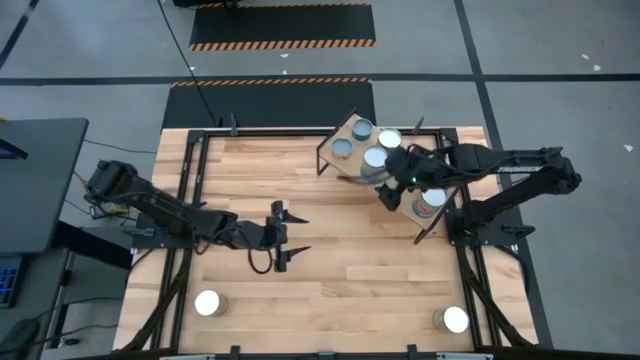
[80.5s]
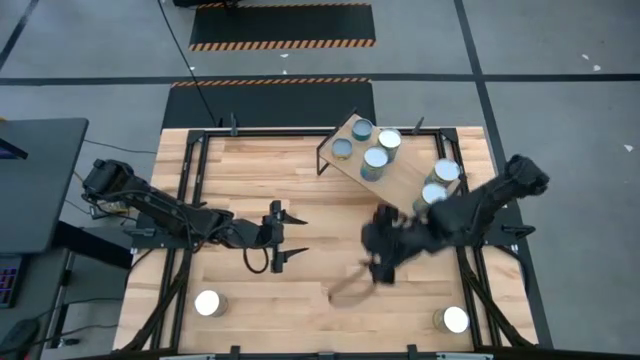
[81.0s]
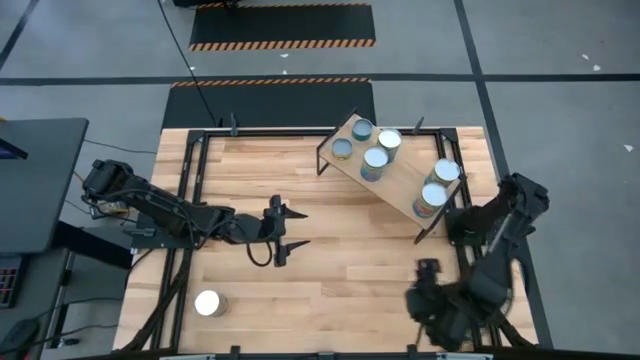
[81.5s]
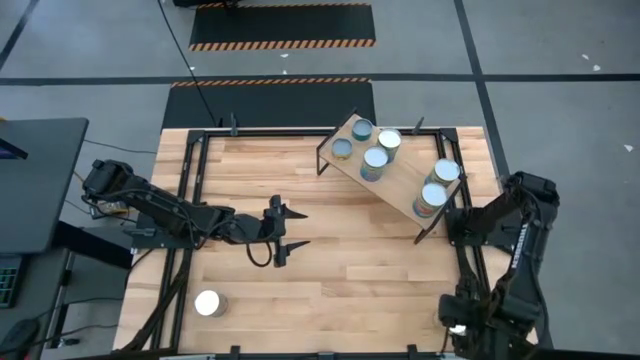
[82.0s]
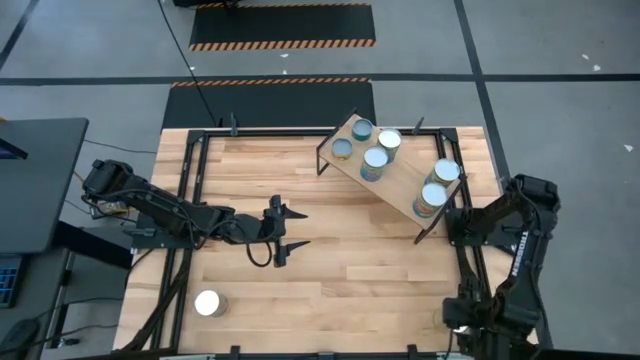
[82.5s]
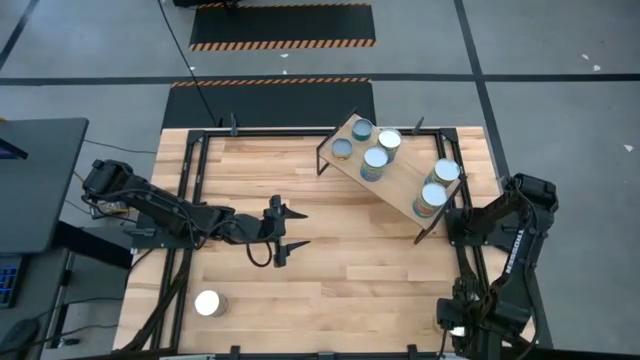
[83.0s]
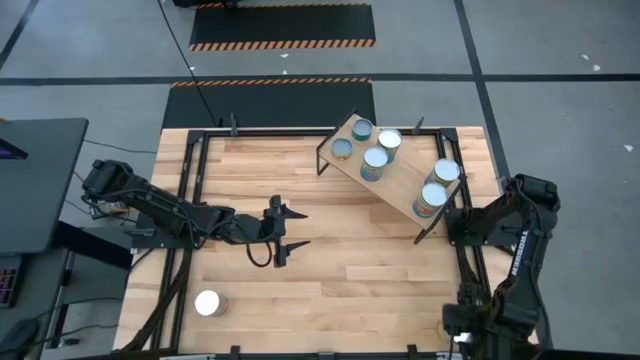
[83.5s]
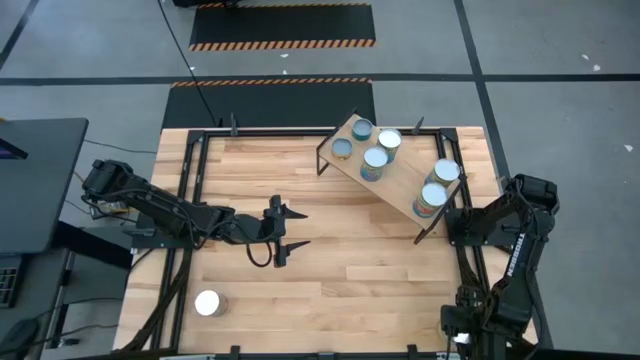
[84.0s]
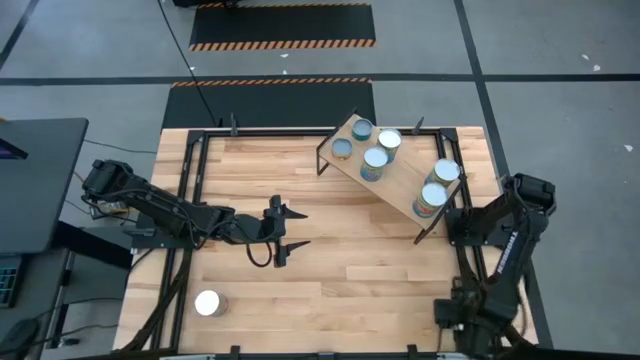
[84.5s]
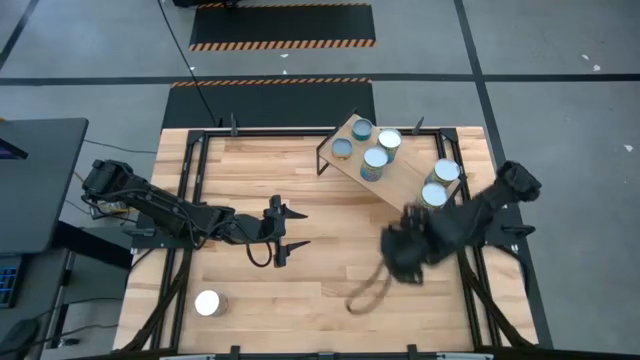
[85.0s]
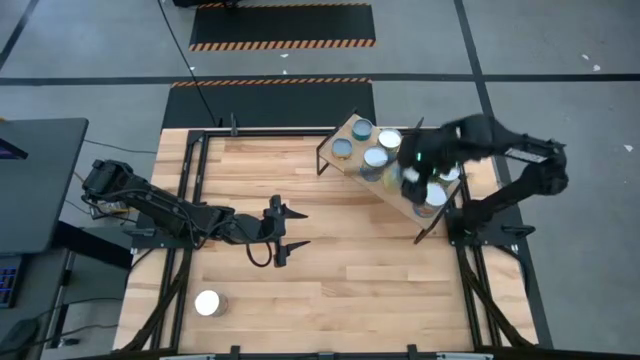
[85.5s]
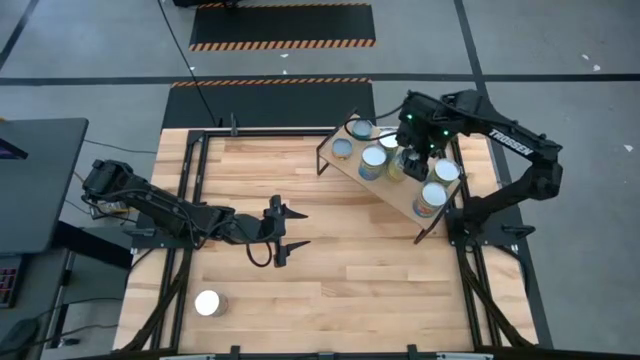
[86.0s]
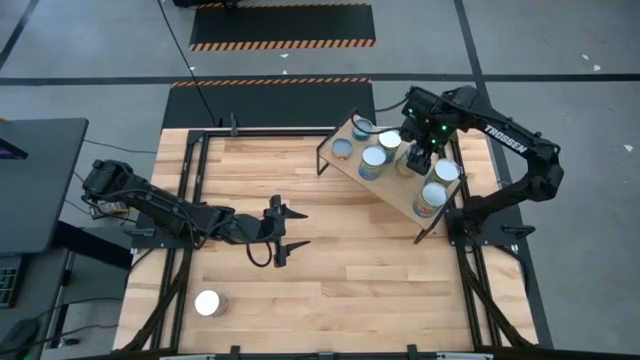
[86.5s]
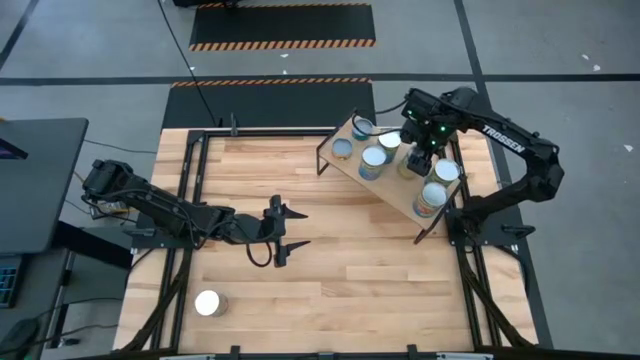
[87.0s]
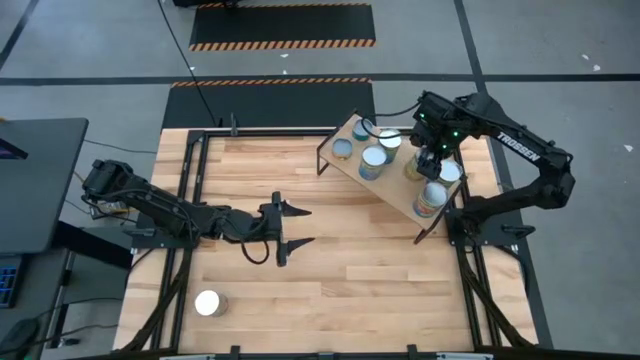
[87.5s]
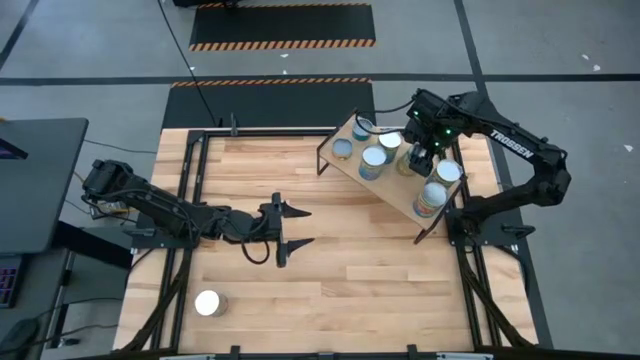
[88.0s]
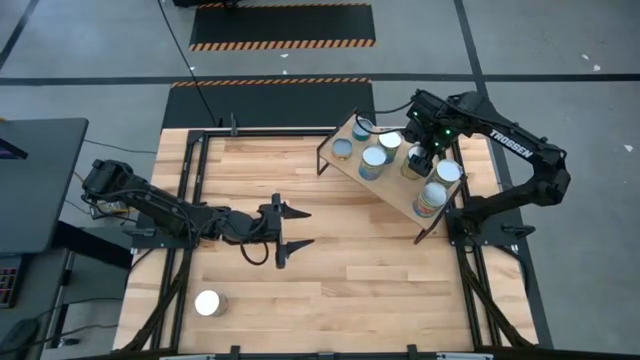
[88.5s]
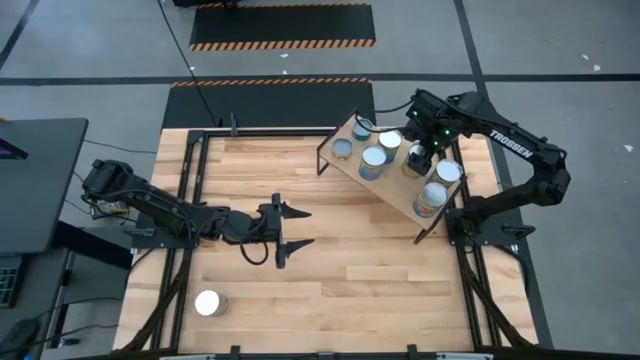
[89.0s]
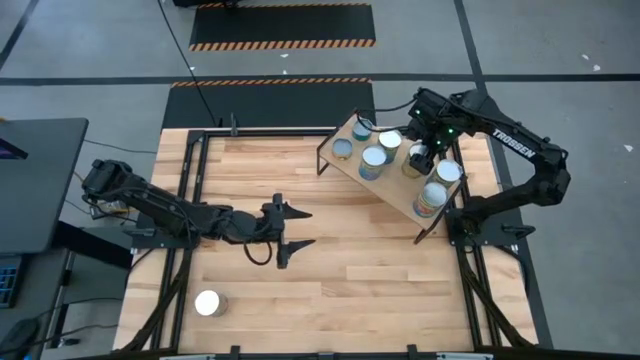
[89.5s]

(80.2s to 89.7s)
Task: Pick and place cans onto a shelf
Put the canned carrots on the shelf

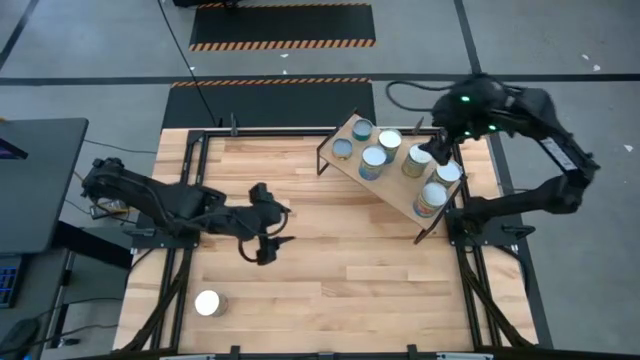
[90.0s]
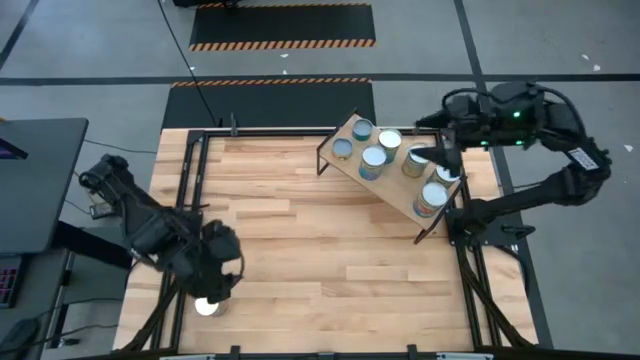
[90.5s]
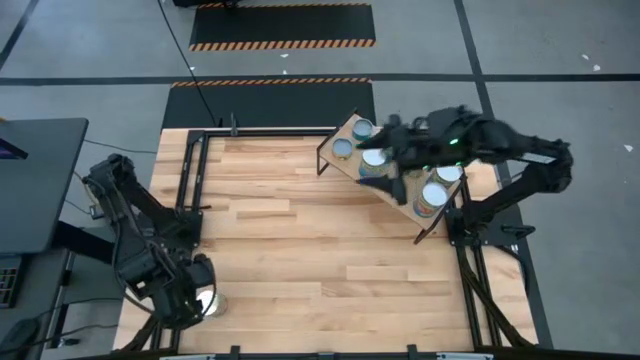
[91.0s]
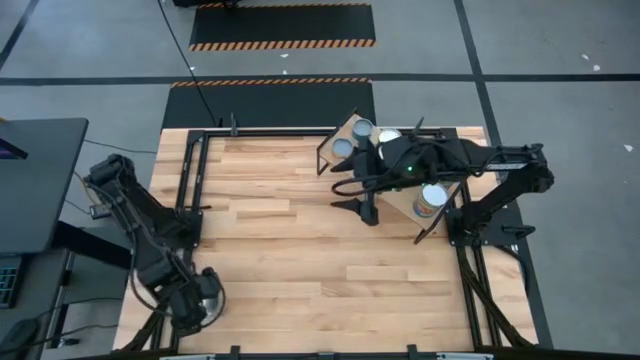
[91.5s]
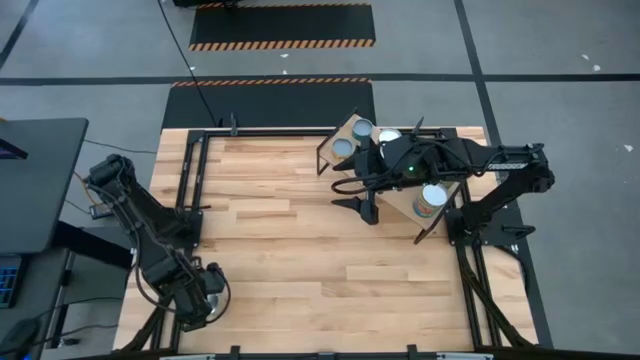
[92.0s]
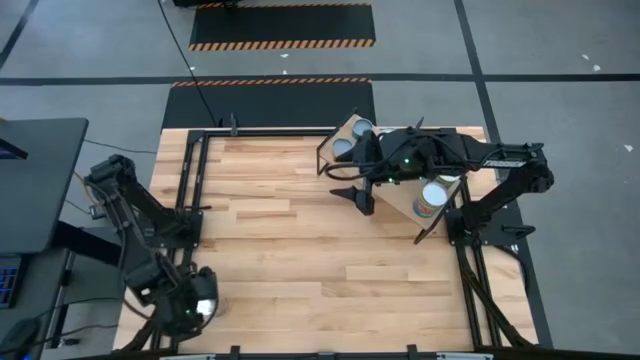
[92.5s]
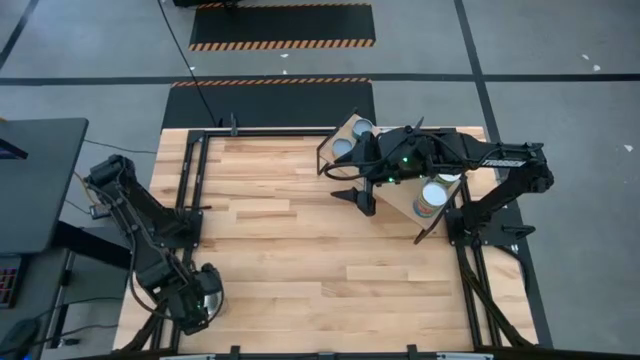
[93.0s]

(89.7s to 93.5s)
Put the canned peaches on the shelf

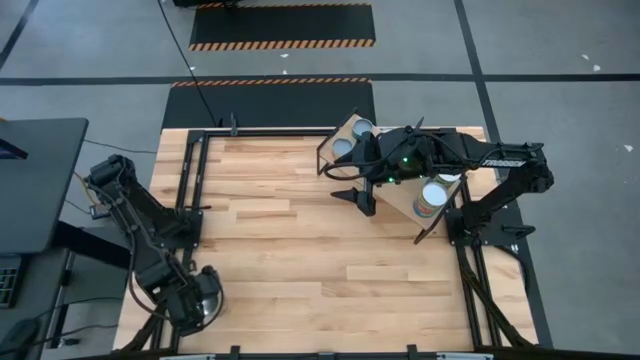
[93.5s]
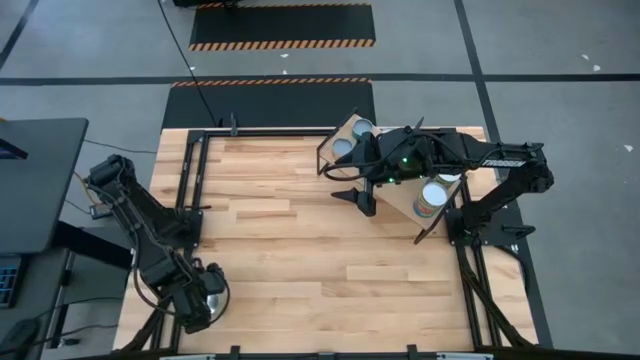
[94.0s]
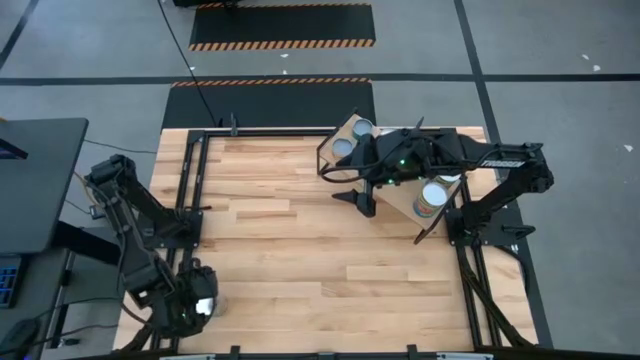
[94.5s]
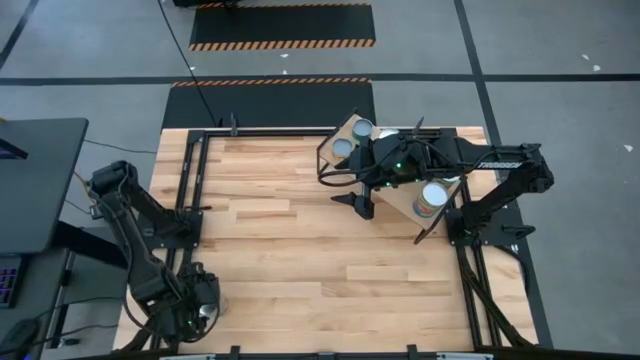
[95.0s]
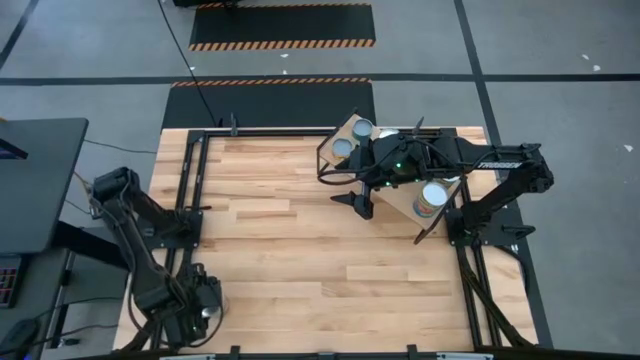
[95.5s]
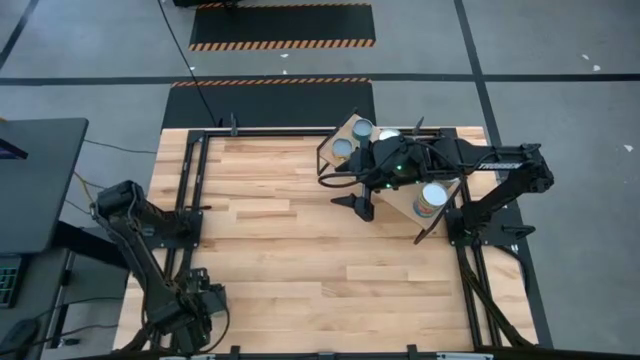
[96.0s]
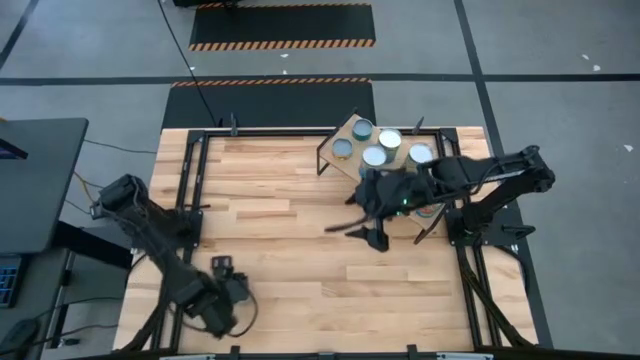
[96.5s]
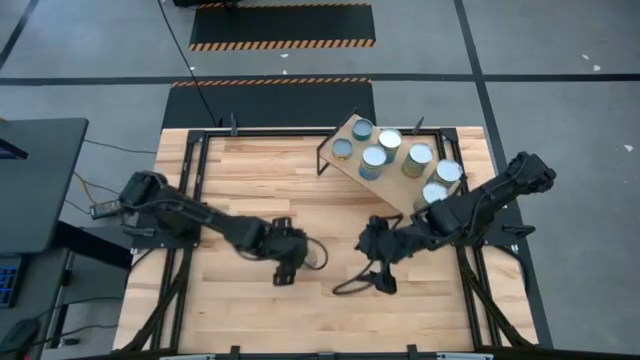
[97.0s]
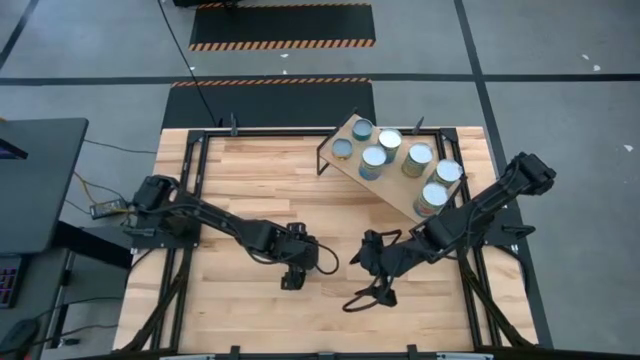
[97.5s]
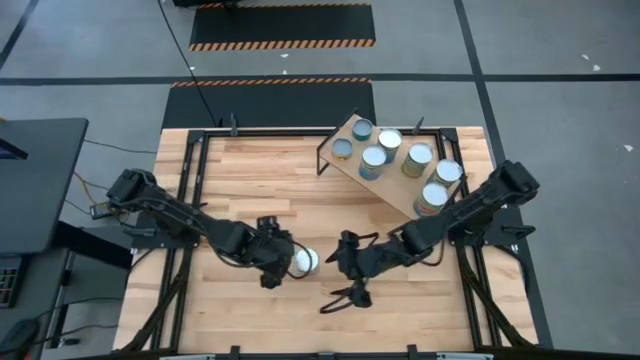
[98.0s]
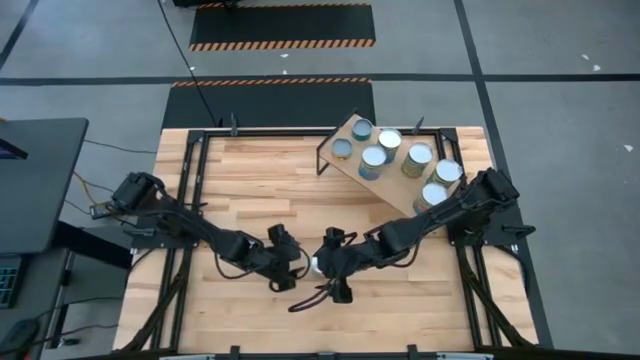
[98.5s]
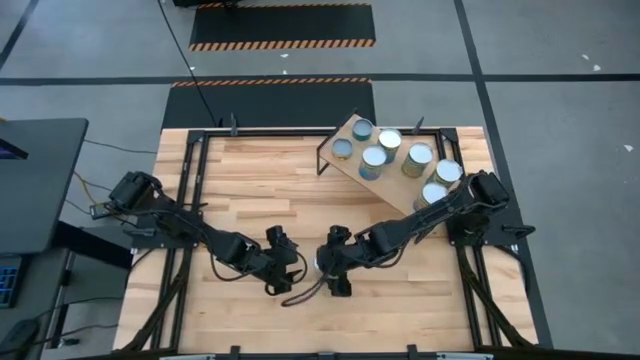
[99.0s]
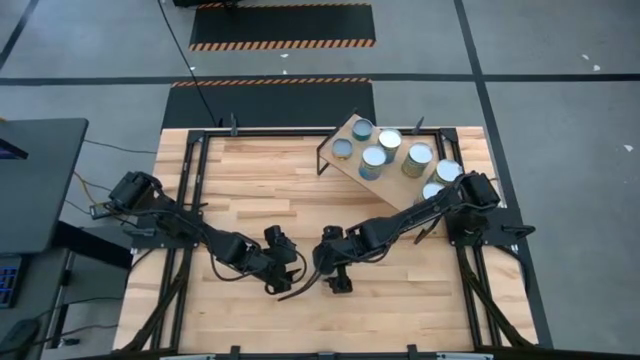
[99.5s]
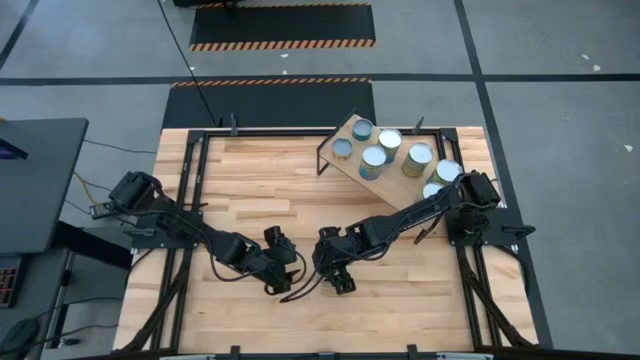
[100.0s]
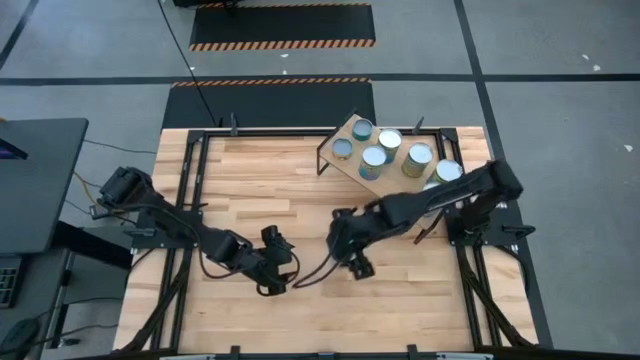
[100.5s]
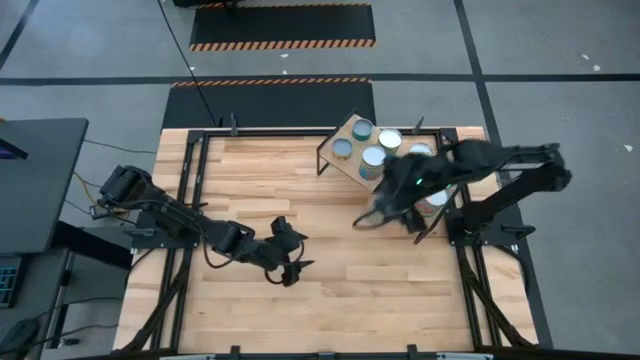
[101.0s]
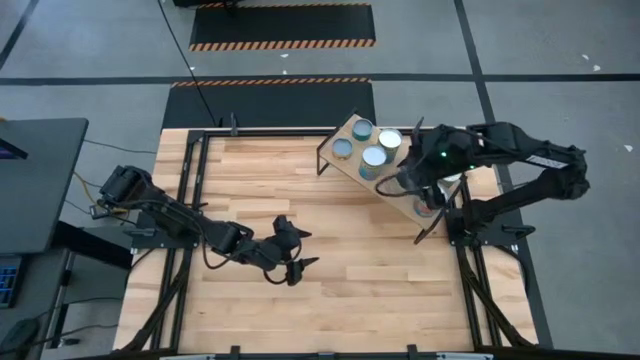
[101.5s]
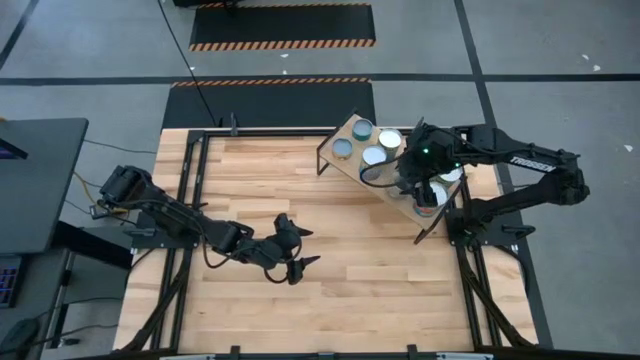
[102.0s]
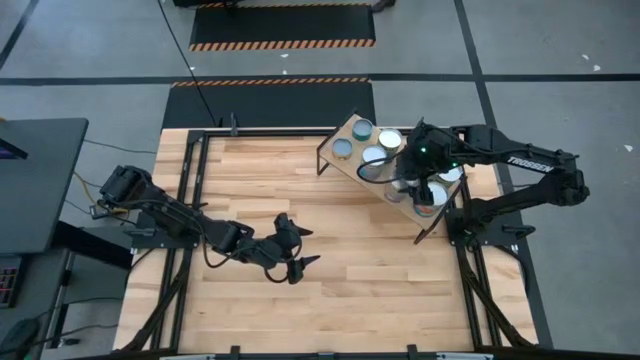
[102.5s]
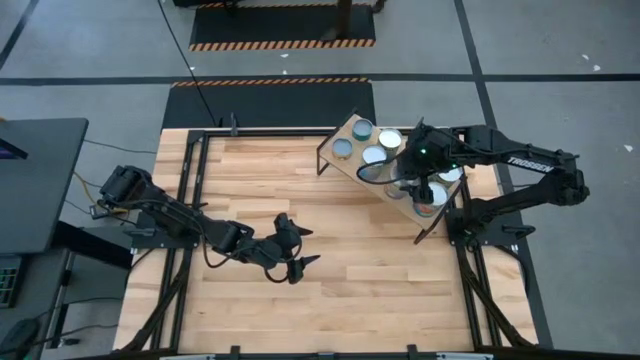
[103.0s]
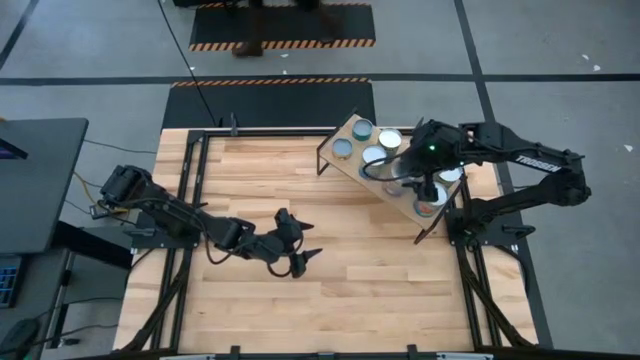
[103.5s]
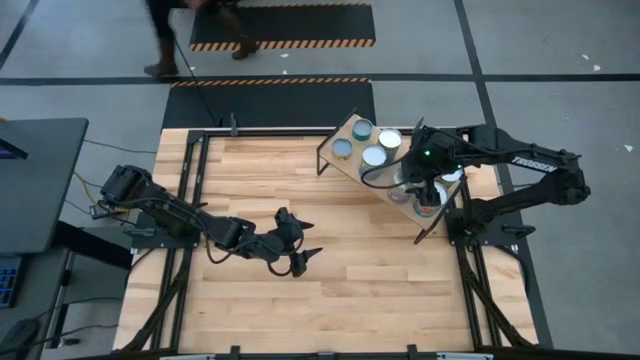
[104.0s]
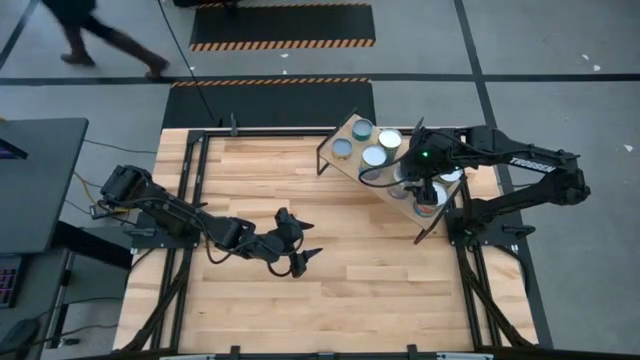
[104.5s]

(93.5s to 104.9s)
Put the canned peaches on the shelf
